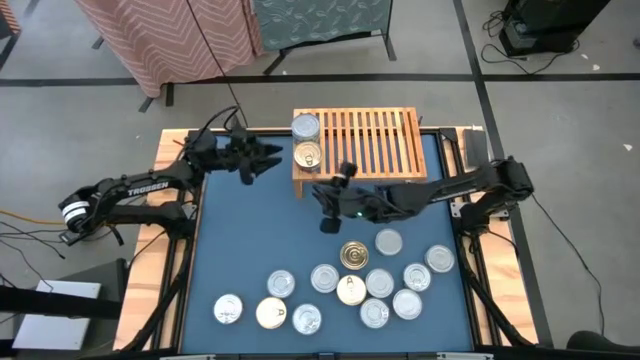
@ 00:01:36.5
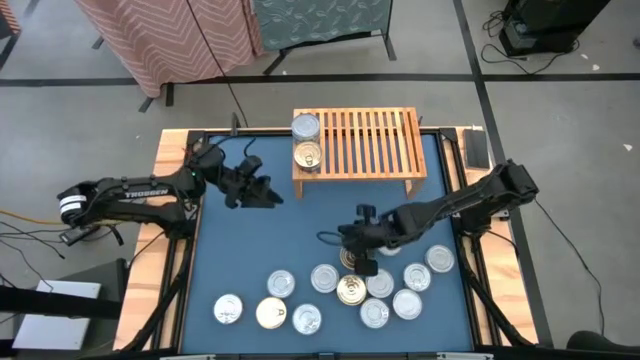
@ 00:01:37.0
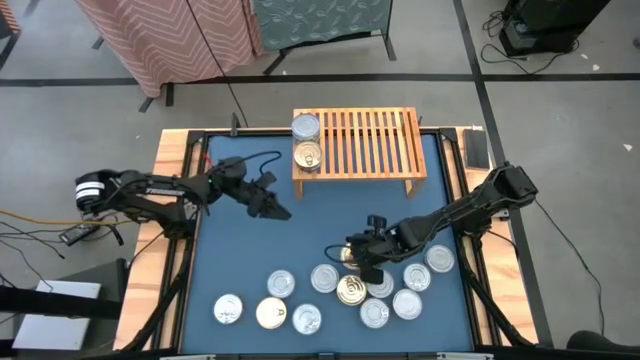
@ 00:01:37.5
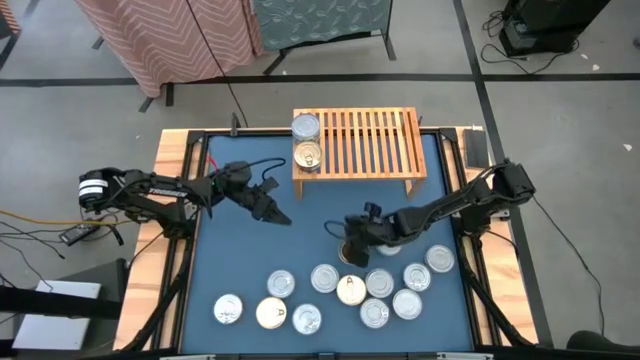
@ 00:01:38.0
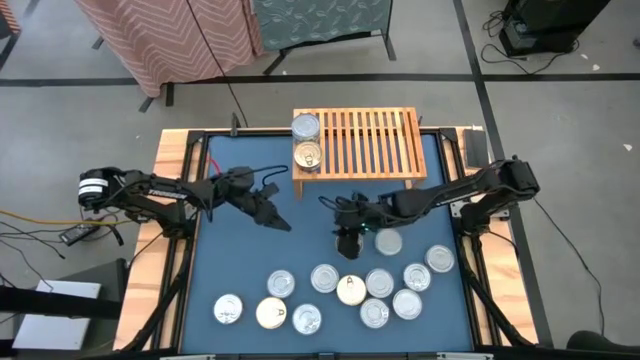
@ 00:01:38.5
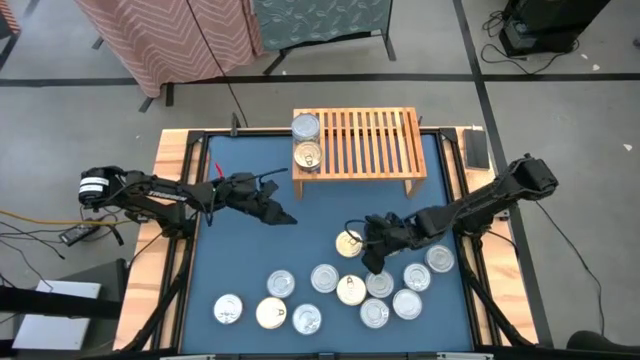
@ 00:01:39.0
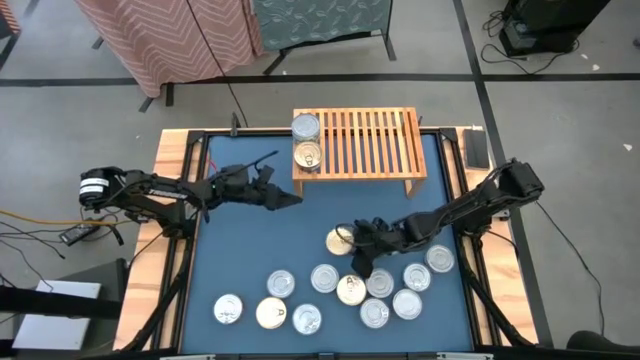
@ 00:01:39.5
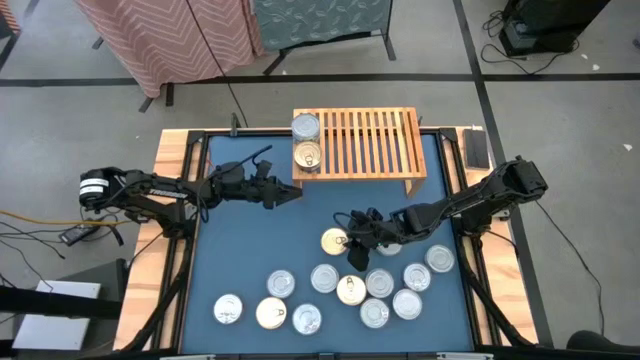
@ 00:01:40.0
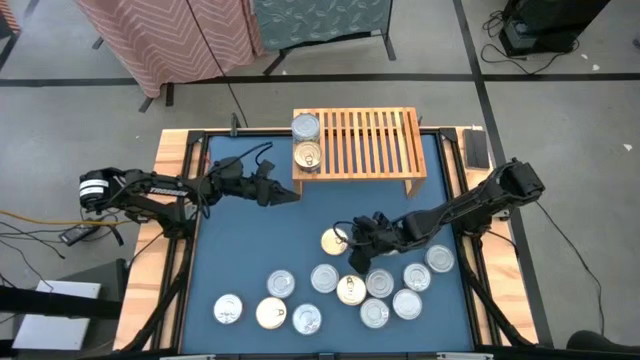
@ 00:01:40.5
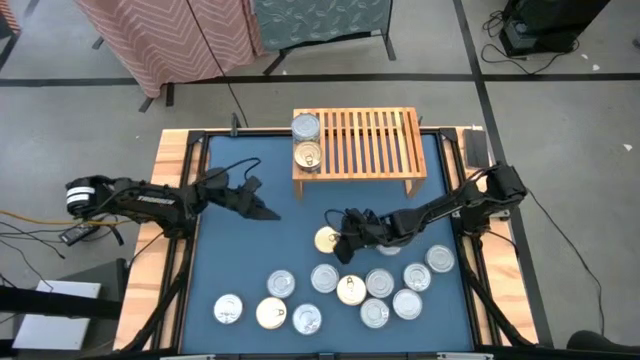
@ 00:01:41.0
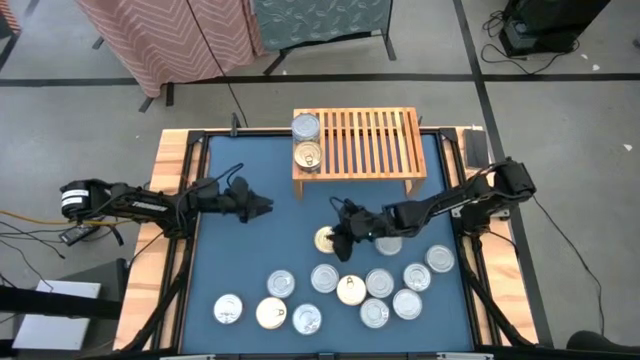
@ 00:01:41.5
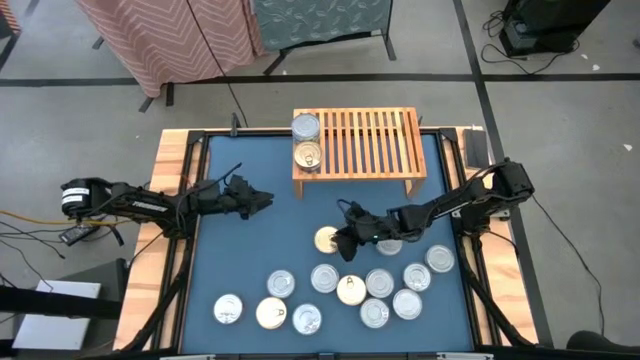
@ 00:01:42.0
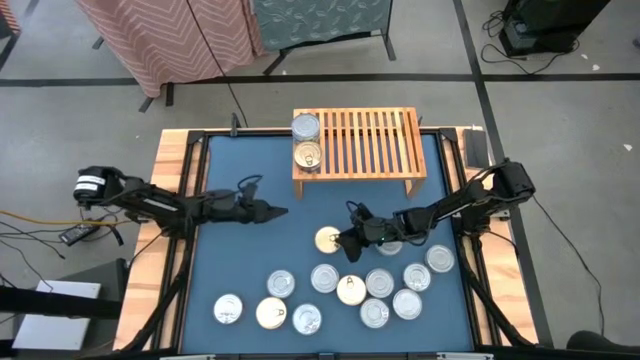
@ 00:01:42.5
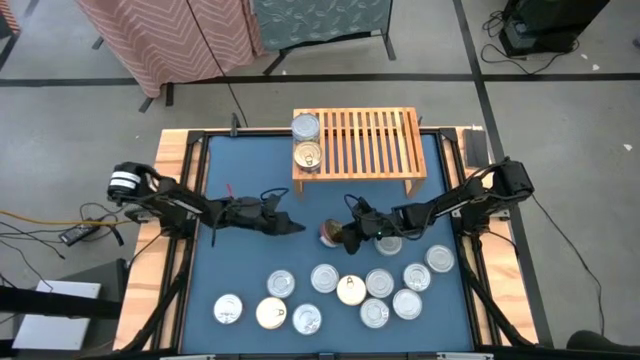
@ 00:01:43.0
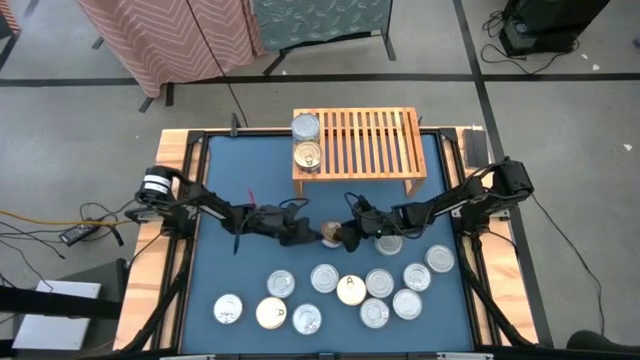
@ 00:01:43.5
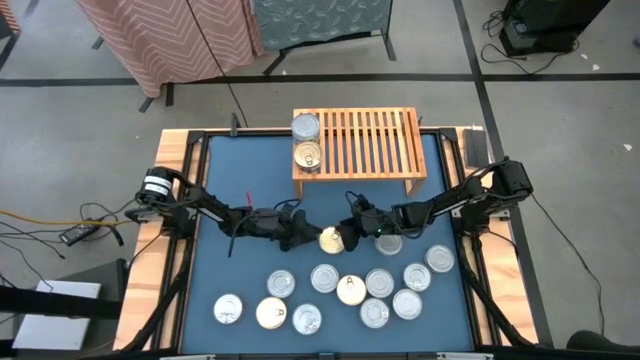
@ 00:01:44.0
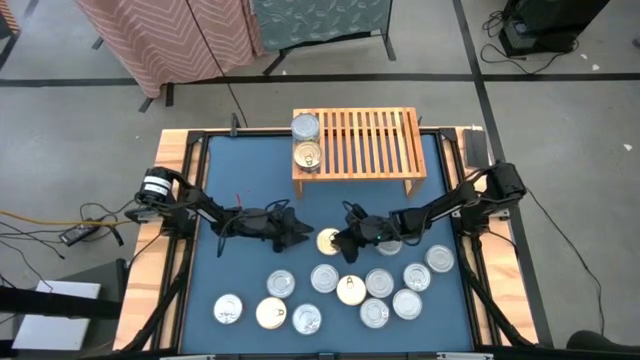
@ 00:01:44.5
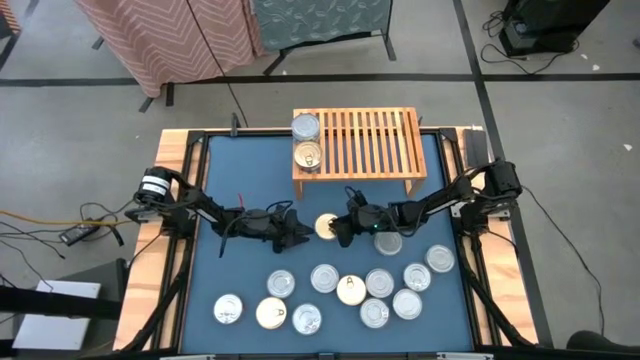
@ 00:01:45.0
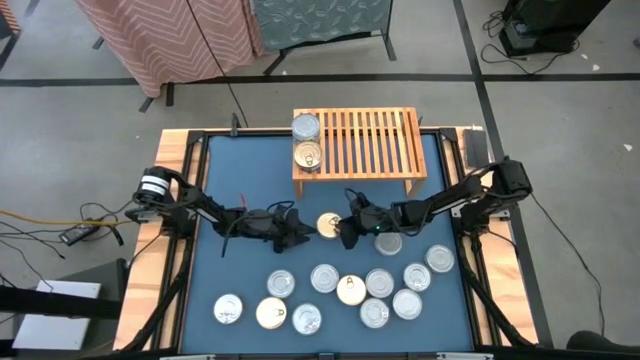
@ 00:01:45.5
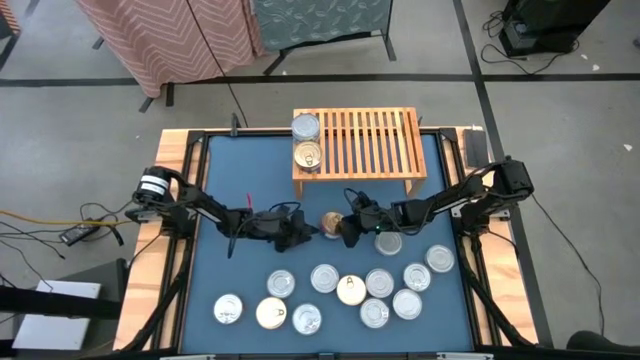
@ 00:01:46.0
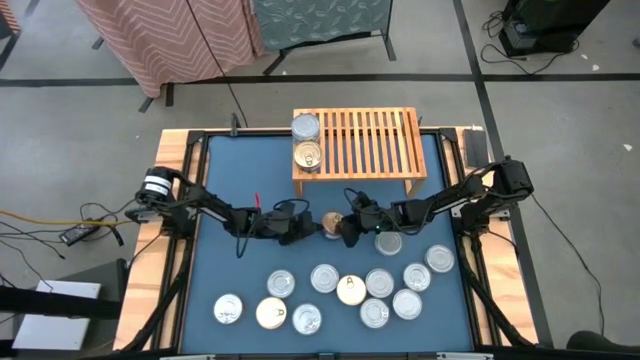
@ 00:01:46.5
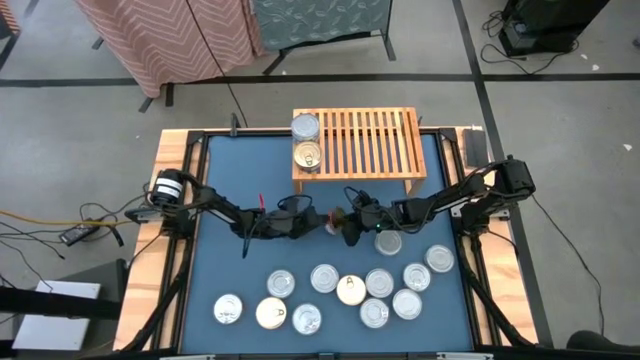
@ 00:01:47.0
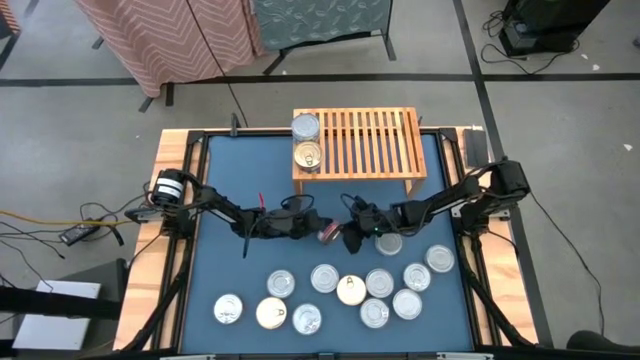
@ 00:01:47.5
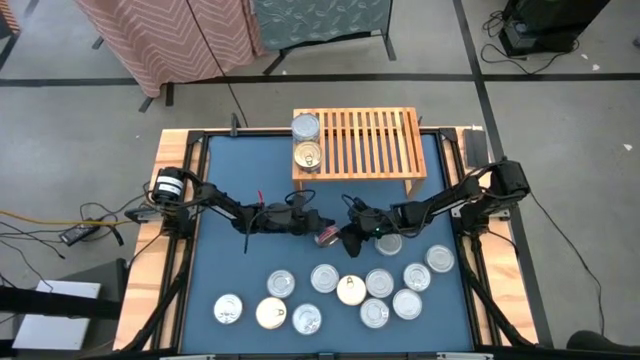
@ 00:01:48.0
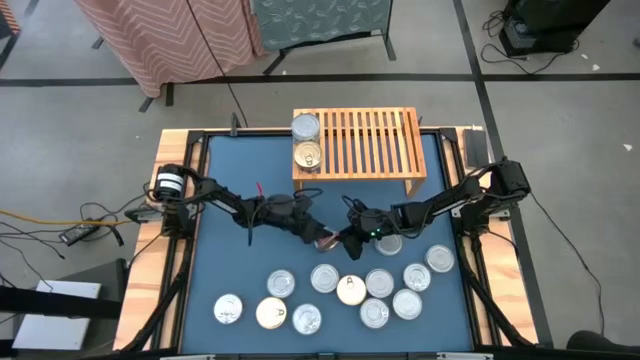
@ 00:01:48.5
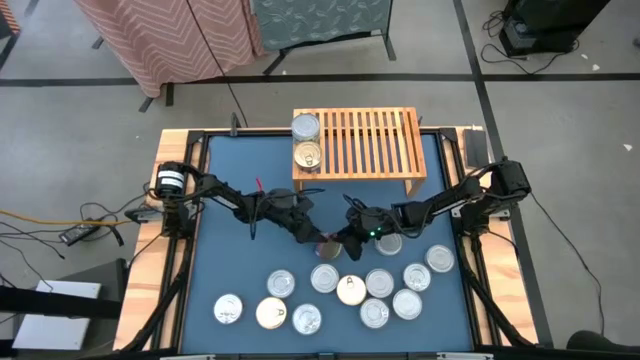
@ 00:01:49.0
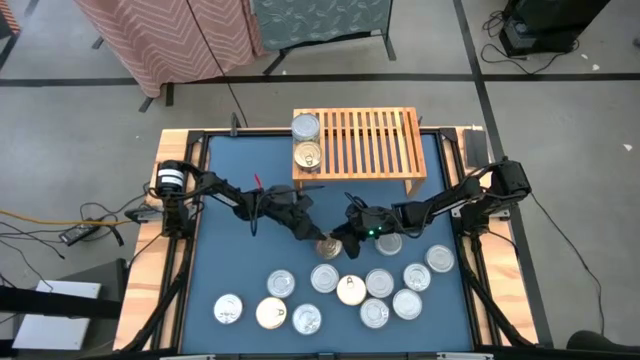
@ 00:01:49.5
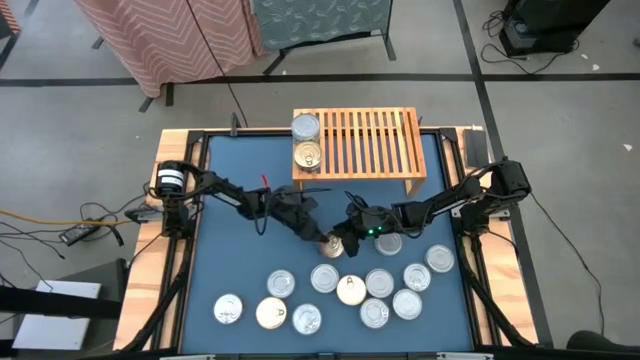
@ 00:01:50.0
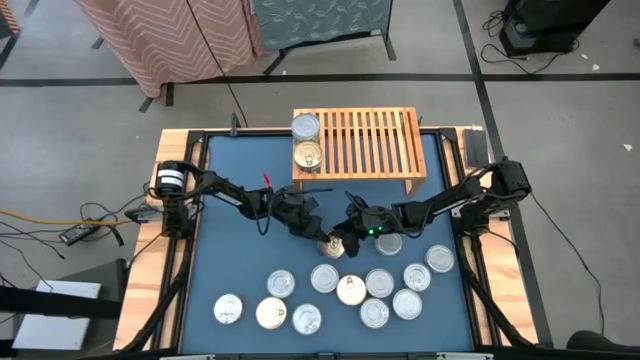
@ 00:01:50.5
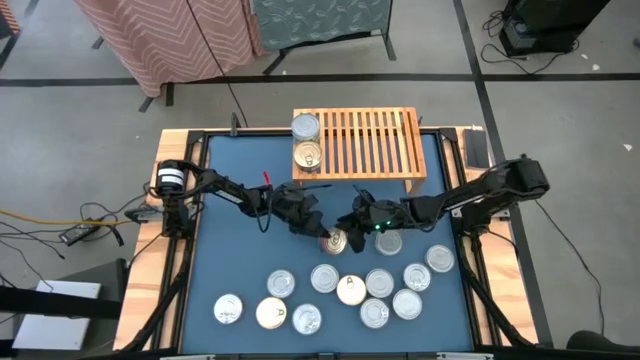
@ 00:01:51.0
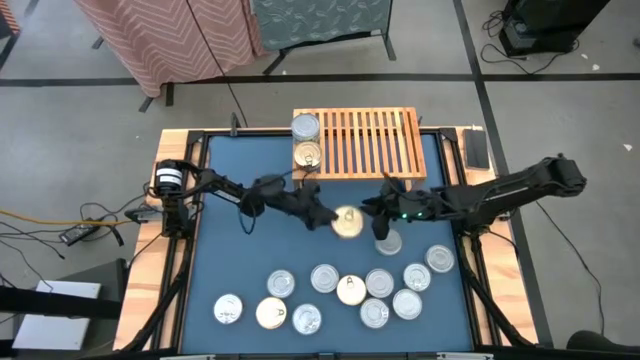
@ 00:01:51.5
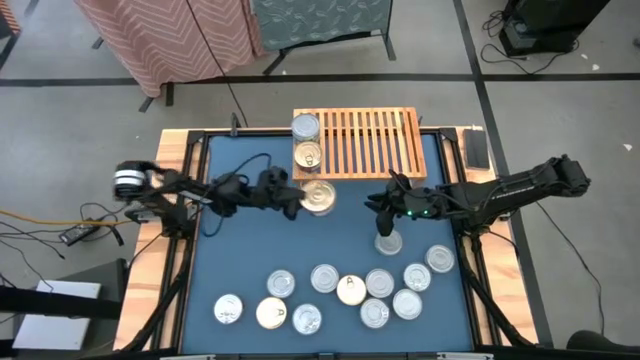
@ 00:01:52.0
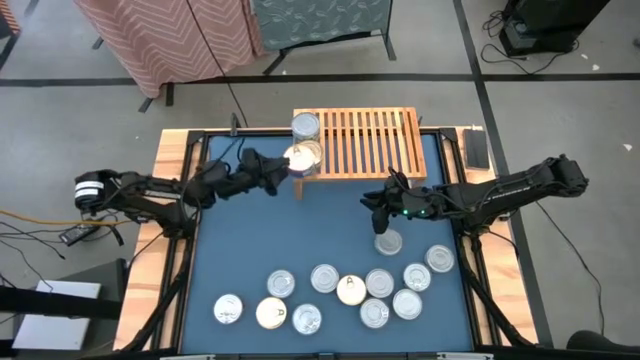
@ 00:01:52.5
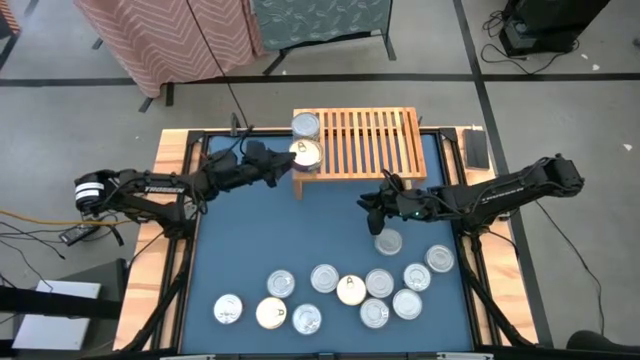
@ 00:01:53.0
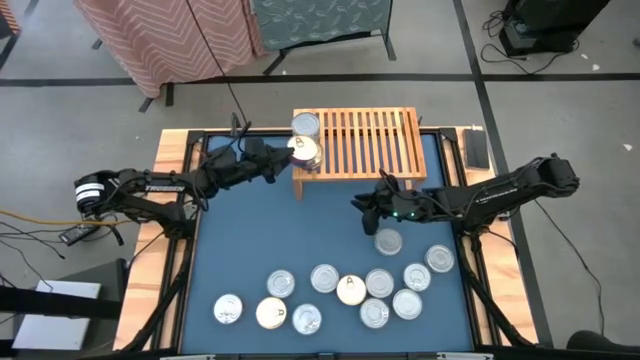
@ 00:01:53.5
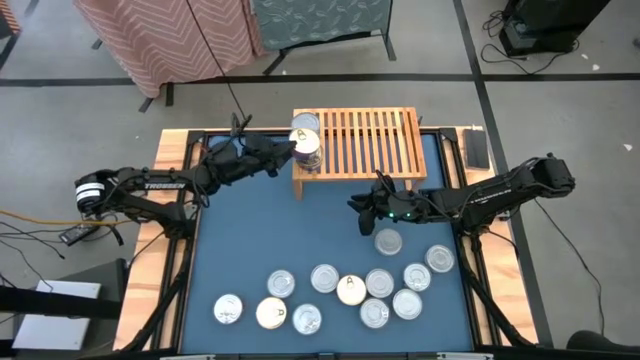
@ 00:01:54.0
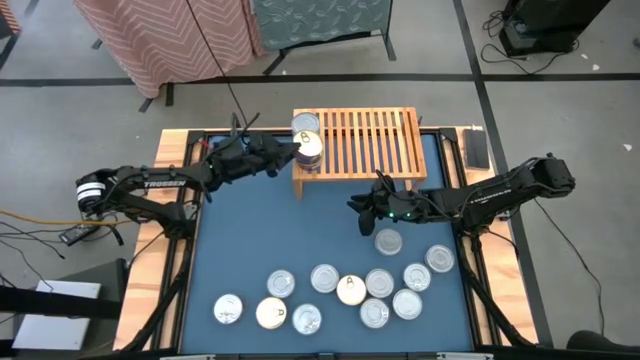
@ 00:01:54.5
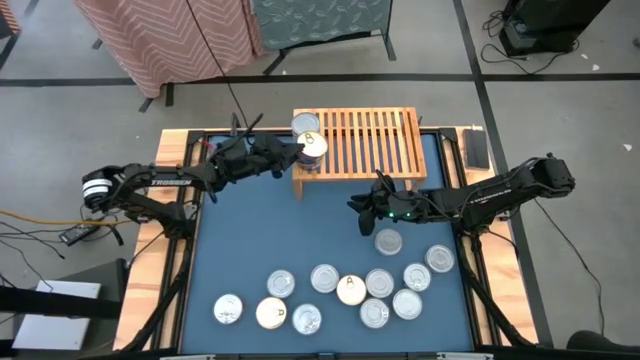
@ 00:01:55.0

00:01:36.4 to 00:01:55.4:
Task: Stack canned seafood by type on shelf
Stack the blue tuna can on top of the blue tuna can on the shelf

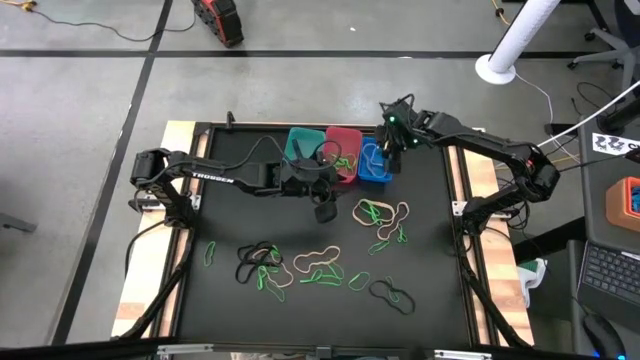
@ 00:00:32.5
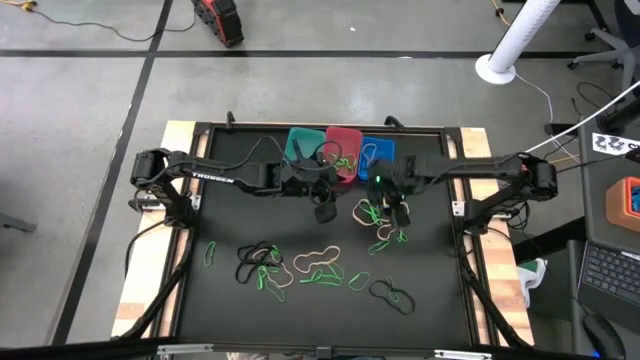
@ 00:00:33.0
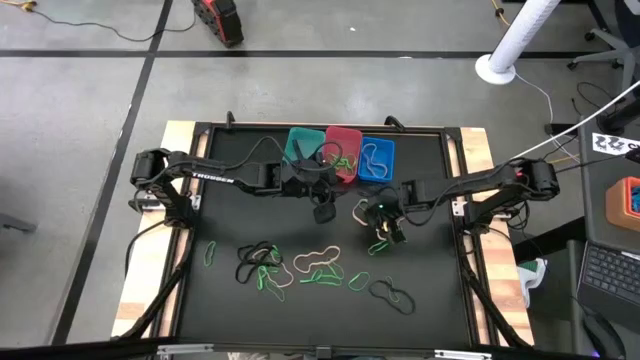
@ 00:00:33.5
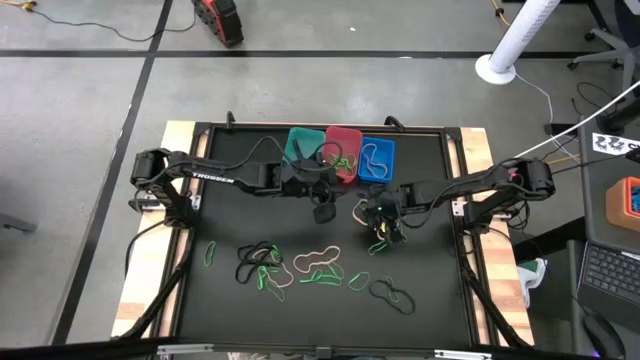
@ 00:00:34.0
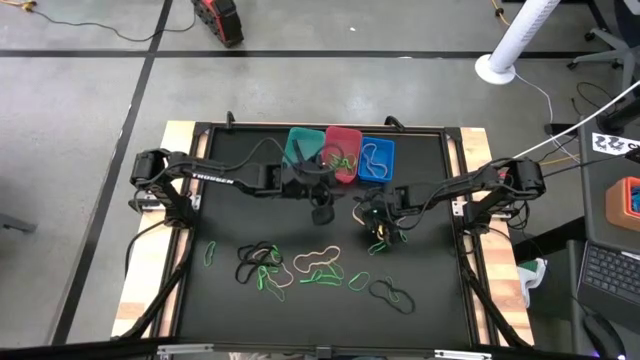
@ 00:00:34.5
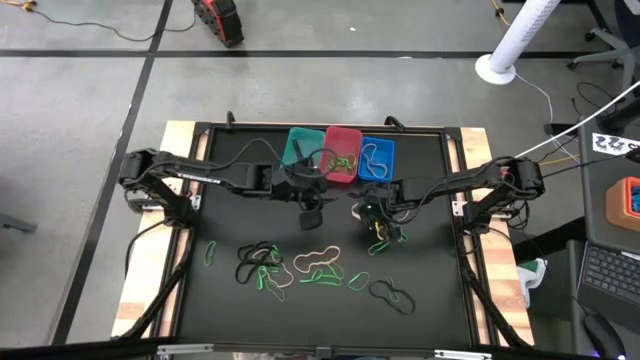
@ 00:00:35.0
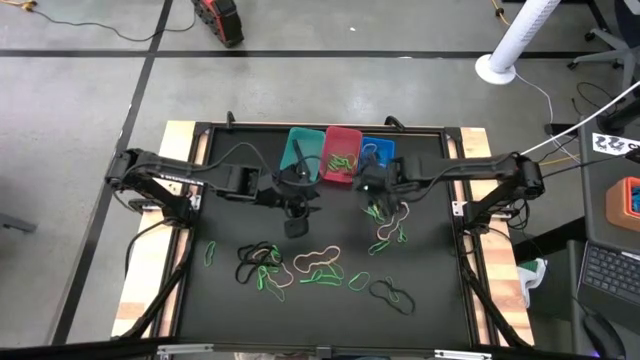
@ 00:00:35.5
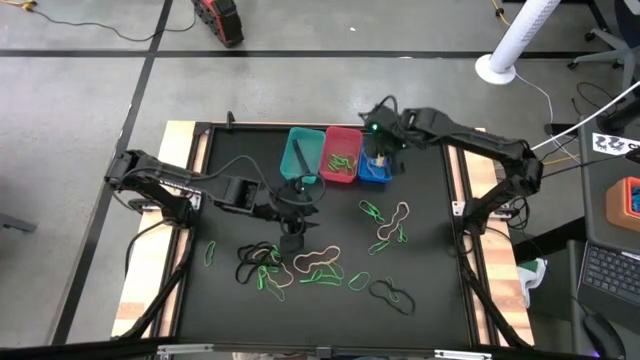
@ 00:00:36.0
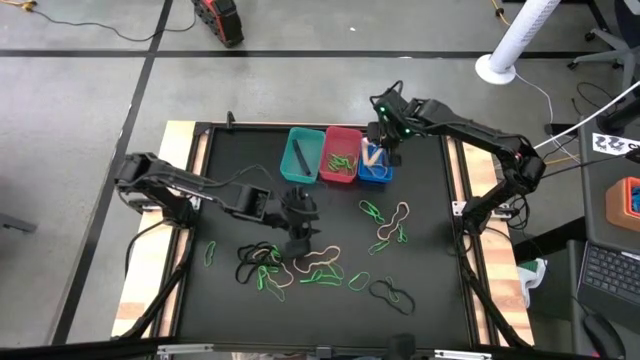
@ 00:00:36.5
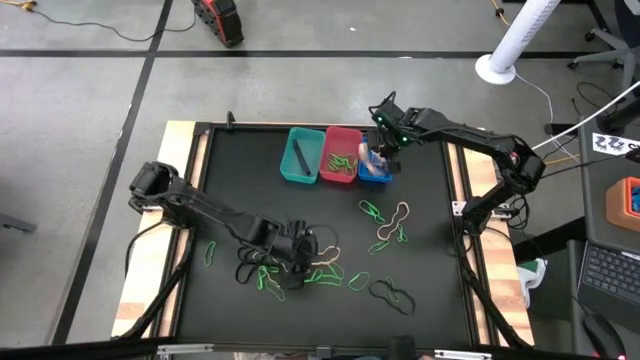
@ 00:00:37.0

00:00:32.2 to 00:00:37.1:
Task: Sort rubber bands into baskets
Put the brown rubber band into the blue bin
